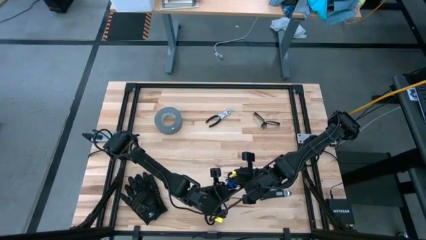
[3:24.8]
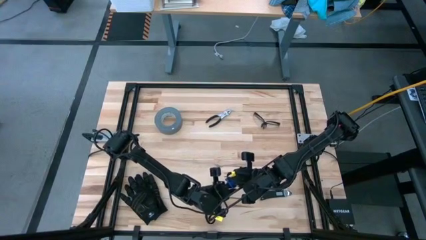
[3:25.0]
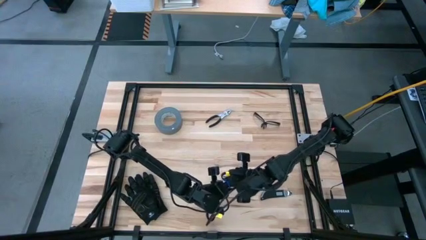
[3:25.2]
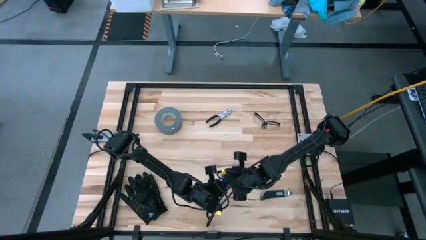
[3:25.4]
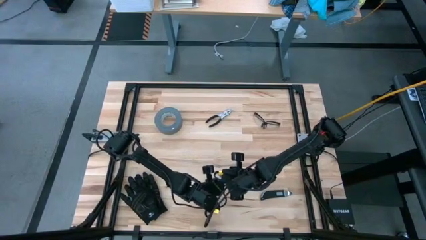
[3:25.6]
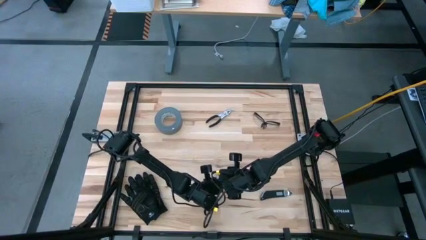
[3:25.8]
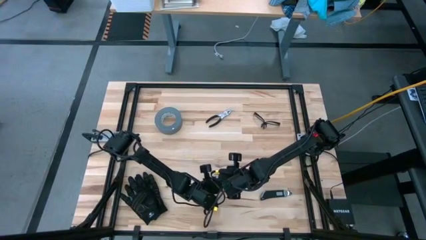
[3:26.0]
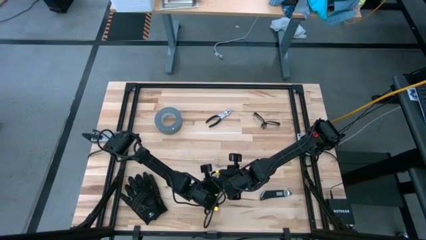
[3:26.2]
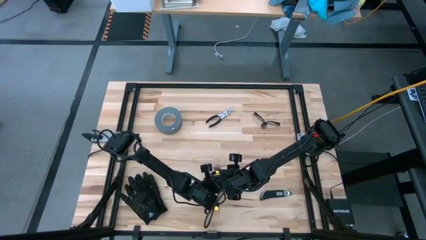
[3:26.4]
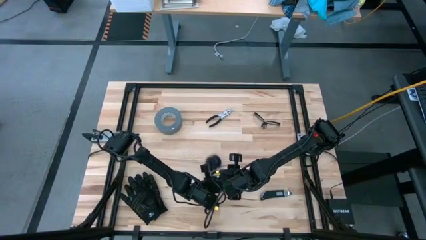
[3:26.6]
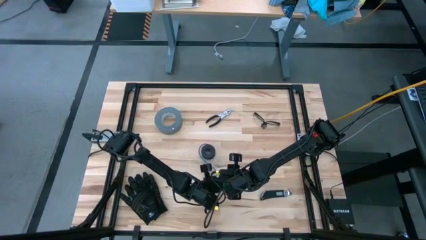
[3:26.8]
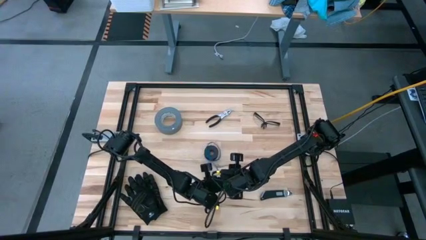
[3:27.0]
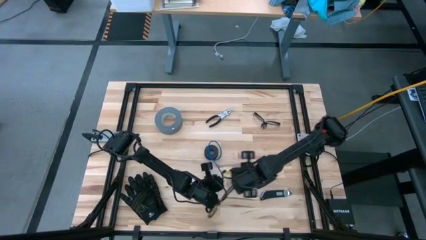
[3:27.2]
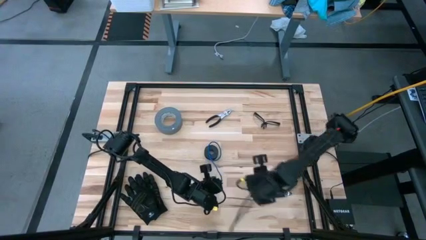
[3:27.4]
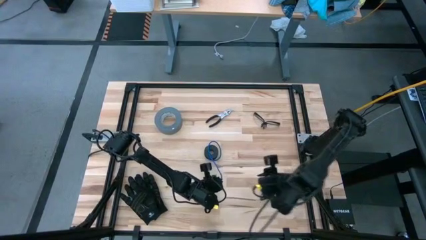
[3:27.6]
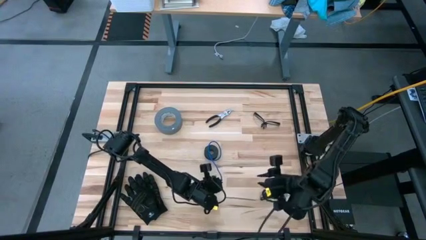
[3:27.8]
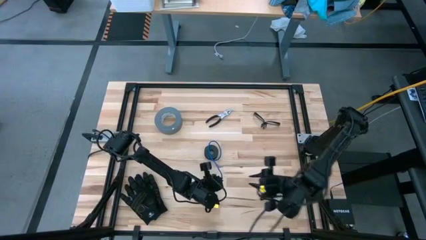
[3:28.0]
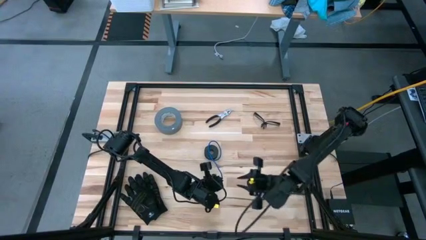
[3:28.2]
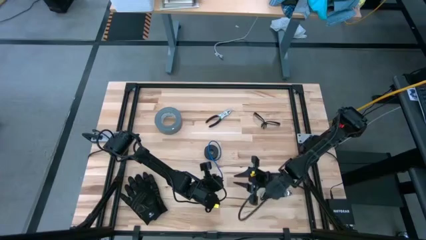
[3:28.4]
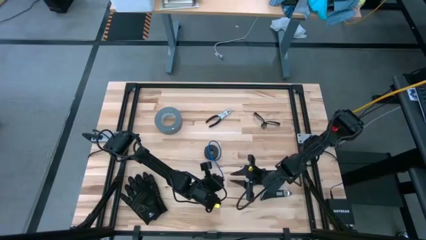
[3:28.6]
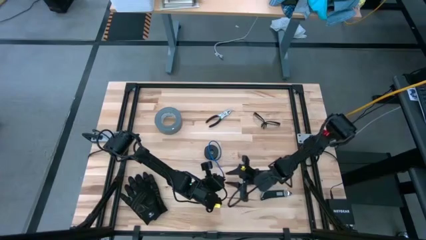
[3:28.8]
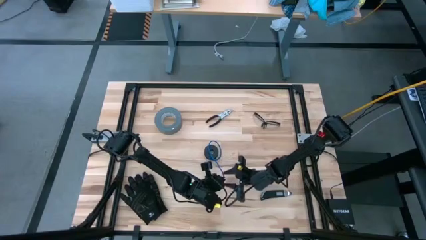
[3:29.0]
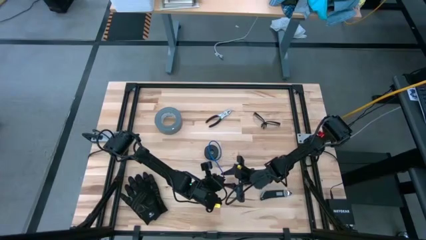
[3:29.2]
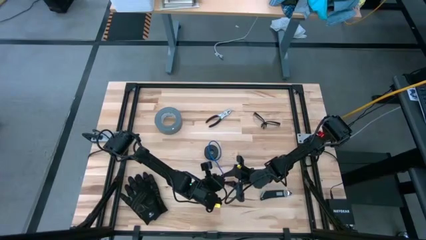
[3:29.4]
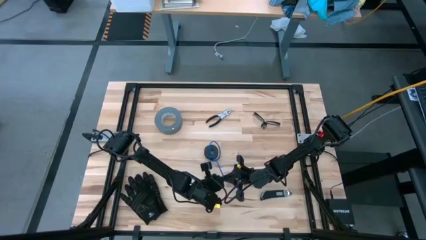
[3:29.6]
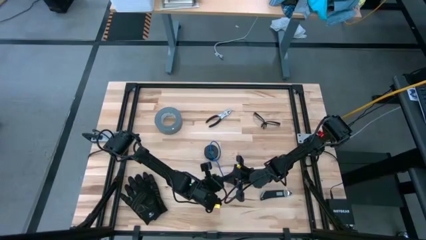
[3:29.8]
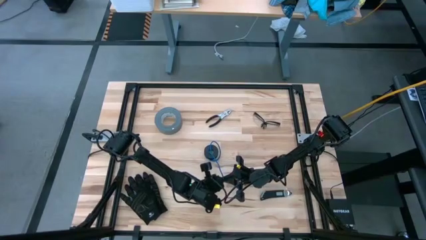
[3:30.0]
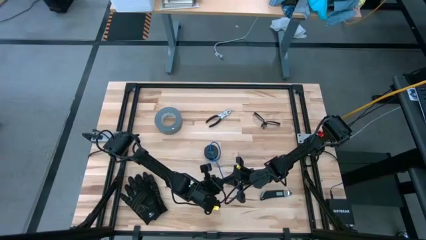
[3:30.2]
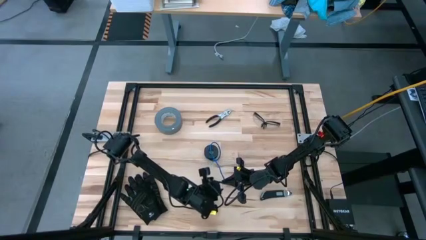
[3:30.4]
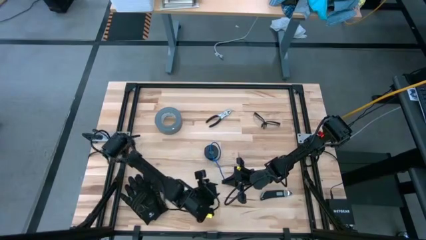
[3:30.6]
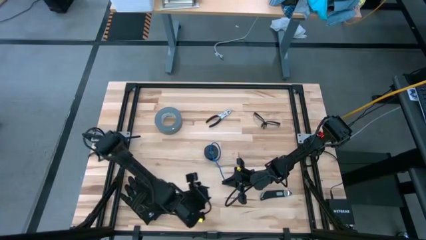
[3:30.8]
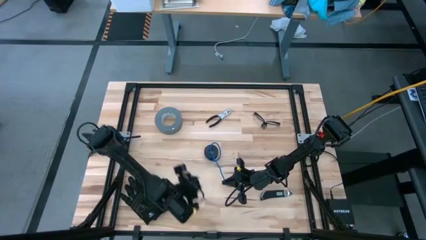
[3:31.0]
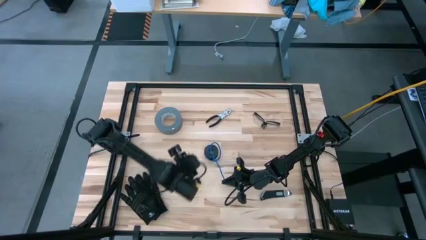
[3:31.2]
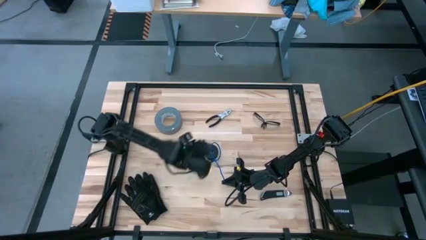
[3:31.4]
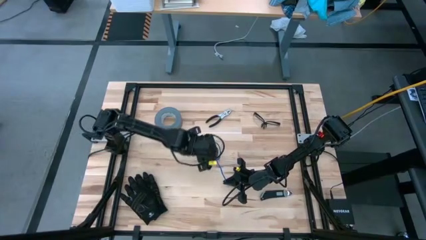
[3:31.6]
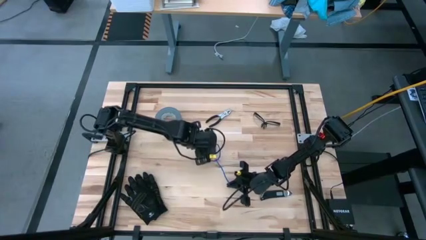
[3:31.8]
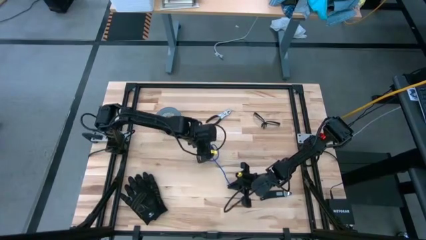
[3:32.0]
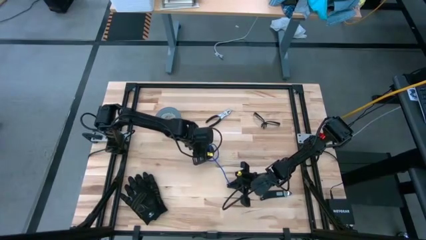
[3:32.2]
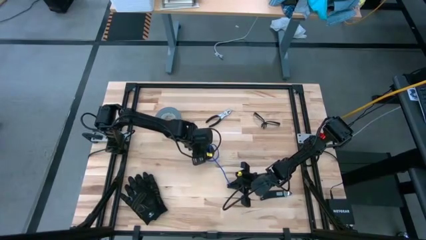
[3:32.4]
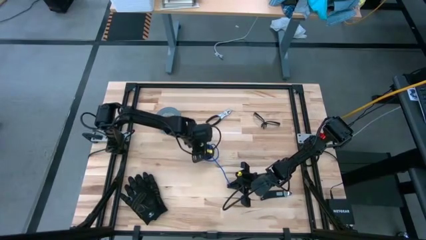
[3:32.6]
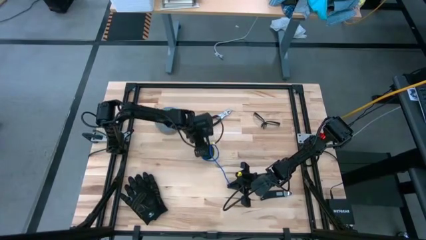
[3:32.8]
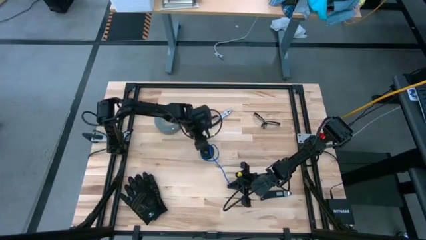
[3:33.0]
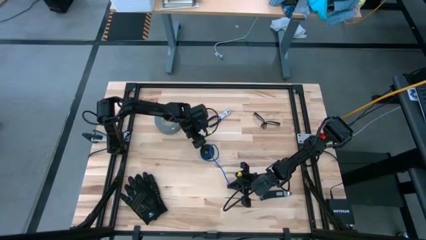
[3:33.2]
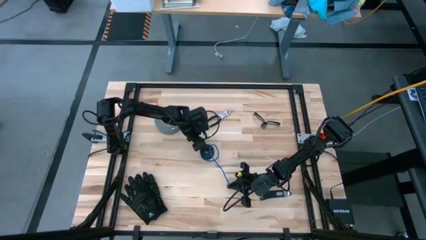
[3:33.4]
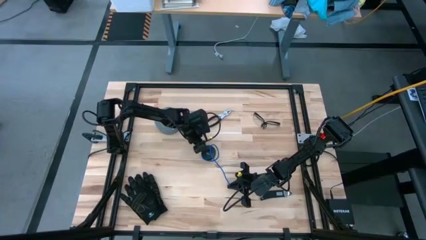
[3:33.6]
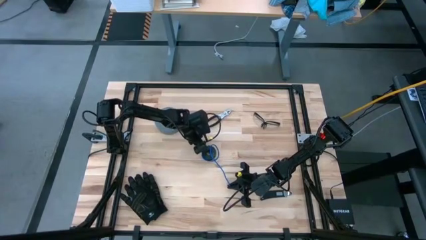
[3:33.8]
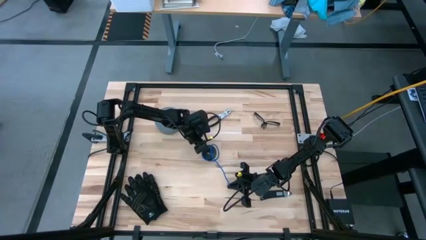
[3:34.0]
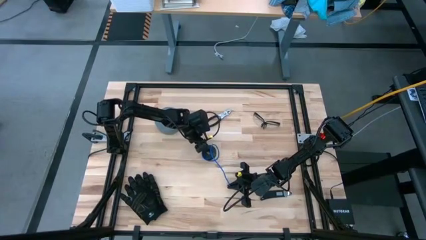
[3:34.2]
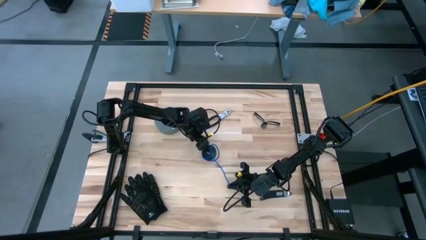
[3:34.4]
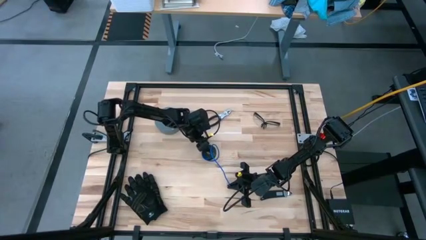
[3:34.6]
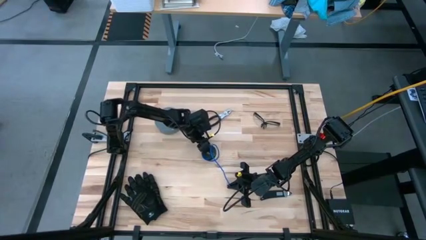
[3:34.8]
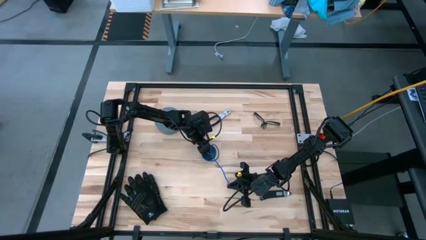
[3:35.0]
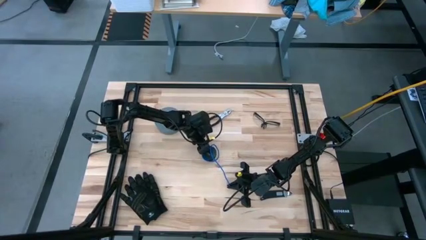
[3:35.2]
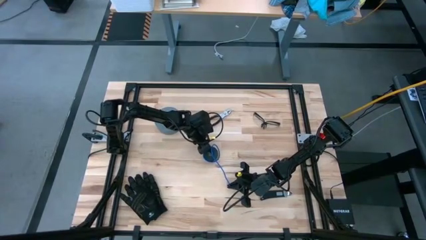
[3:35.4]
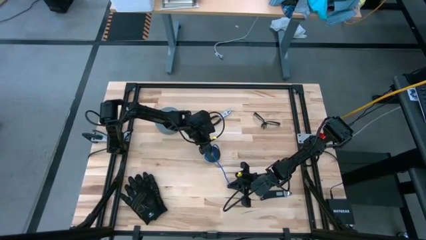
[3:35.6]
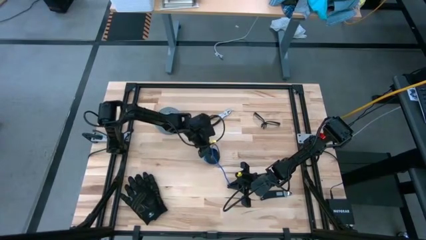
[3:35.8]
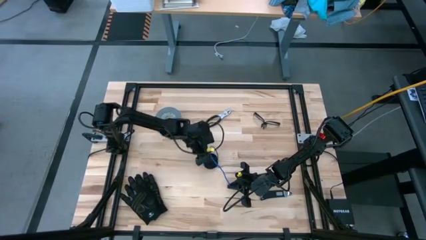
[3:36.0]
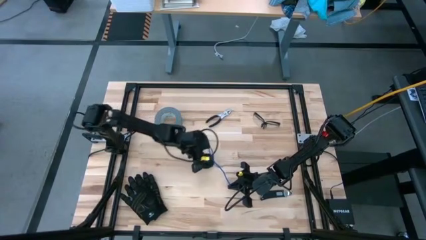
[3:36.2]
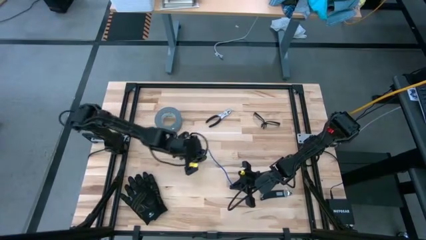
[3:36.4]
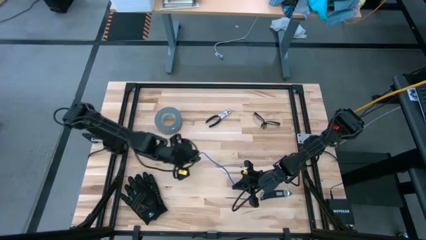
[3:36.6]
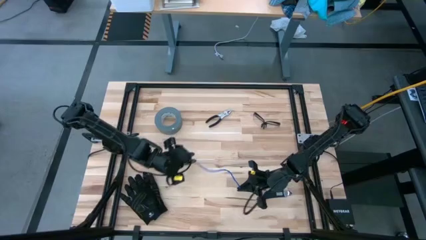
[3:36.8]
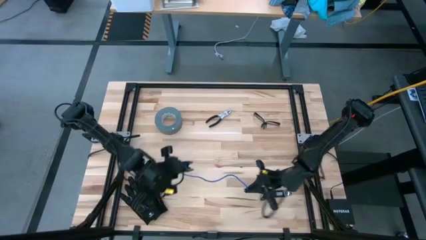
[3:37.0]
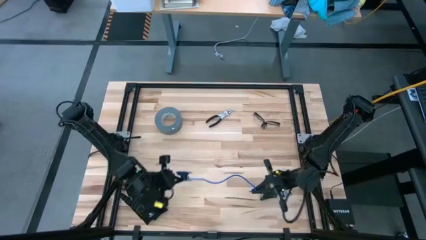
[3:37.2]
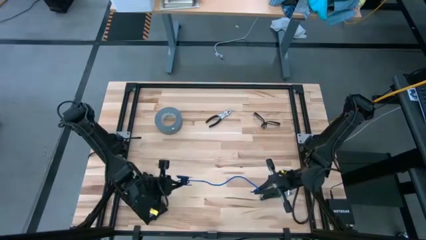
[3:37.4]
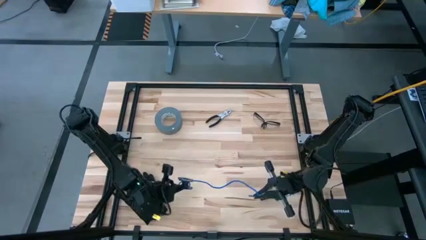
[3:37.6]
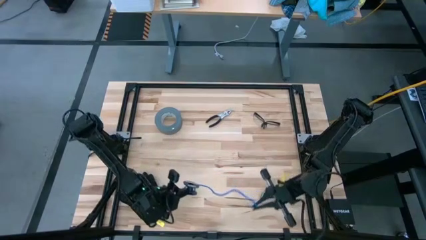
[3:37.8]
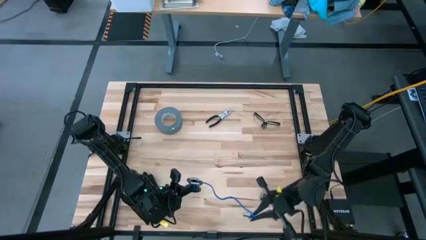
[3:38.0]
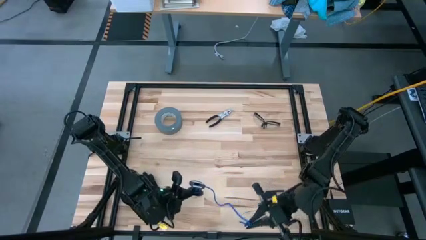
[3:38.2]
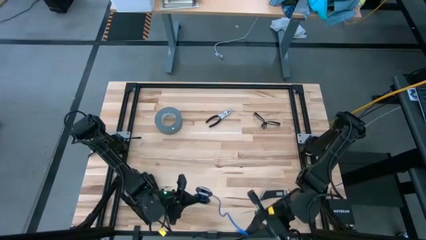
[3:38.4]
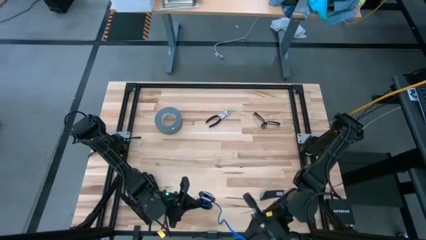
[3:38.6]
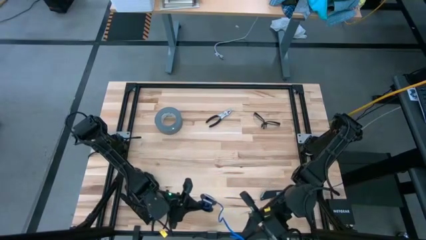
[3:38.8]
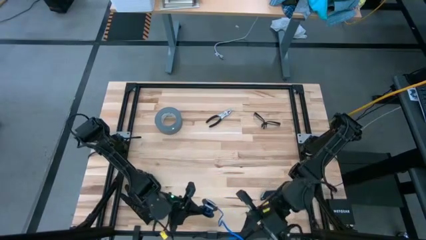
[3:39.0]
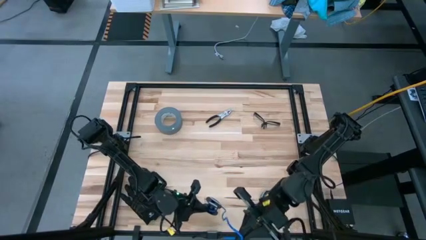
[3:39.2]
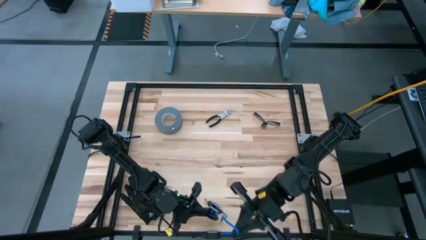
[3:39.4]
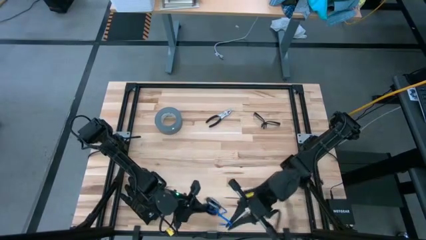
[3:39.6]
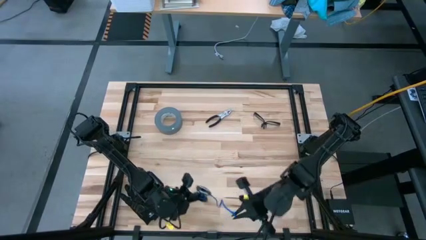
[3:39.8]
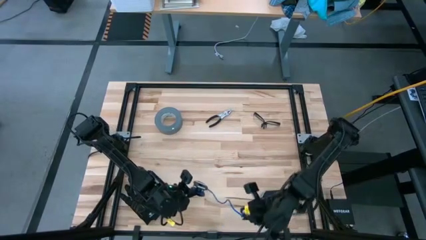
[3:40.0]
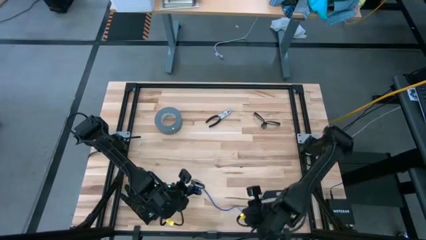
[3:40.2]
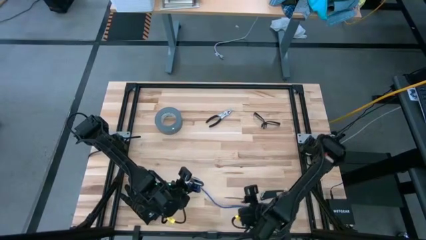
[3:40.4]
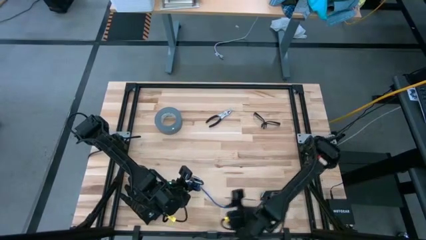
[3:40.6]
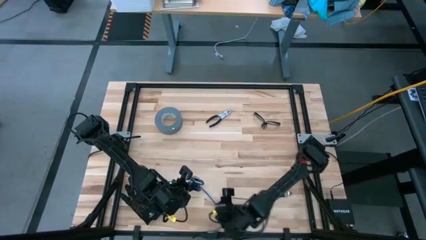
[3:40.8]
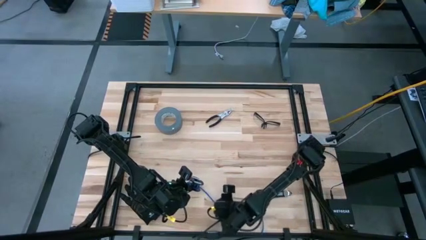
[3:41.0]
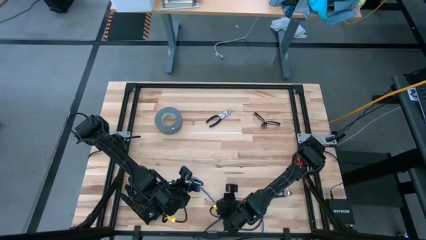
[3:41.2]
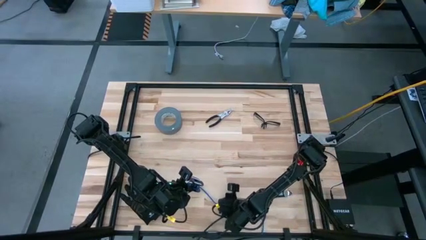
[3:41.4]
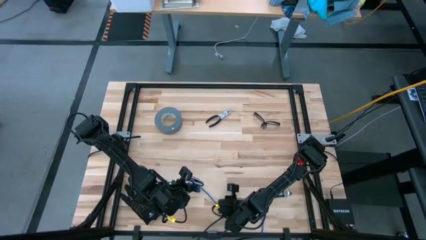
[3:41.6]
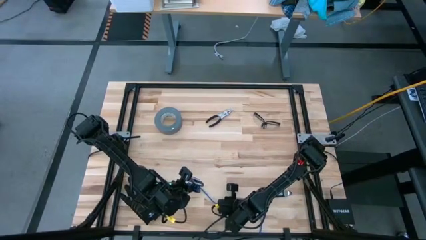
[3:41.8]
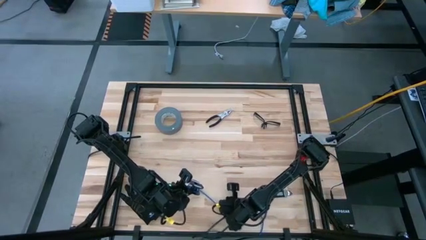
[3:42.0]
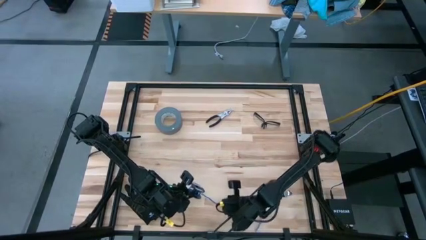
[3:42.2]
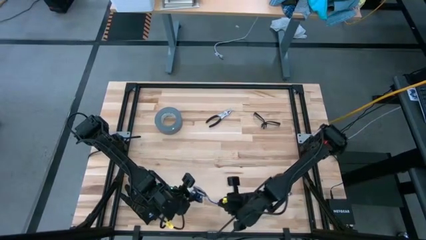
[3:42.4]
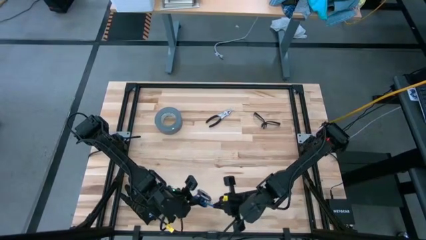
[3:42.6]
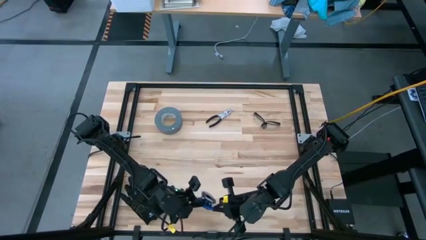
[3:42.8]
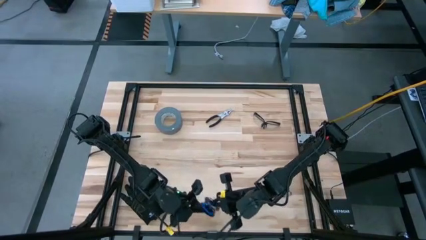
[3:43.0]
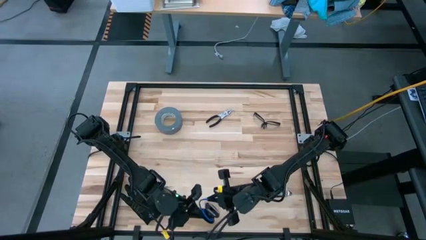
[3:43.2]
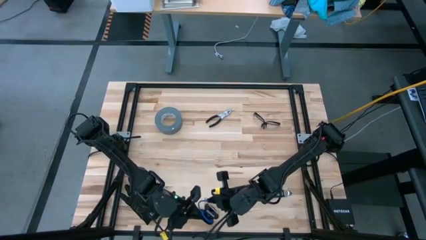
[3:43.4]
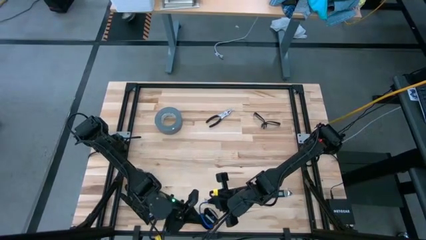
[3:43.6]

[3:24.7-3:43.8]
Task: Coil cords
Coil the blue wire cable onto the black spool
